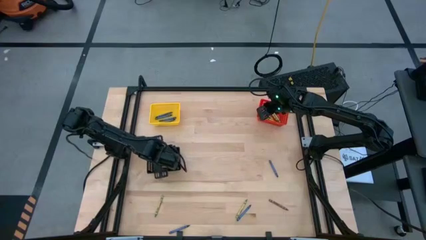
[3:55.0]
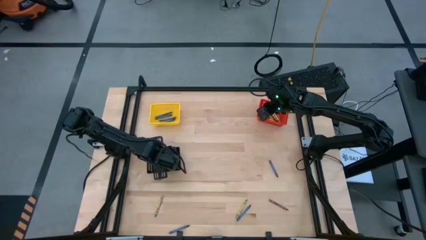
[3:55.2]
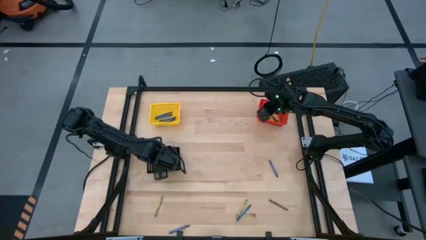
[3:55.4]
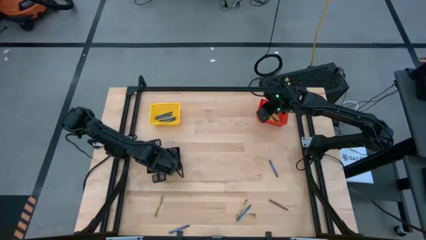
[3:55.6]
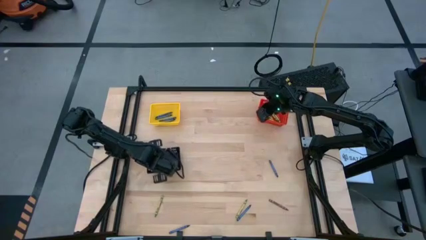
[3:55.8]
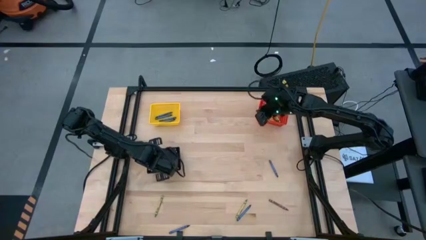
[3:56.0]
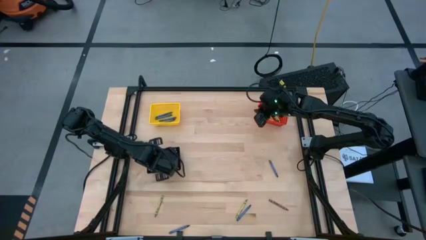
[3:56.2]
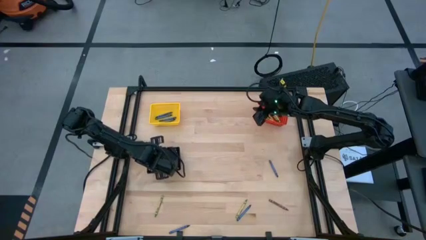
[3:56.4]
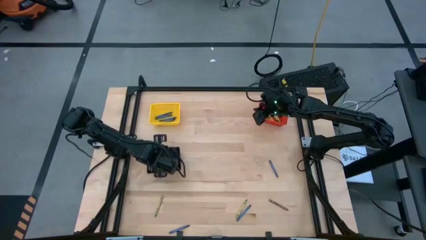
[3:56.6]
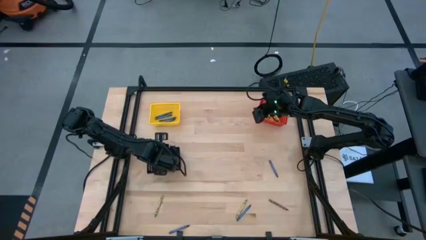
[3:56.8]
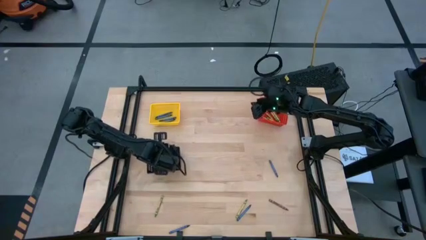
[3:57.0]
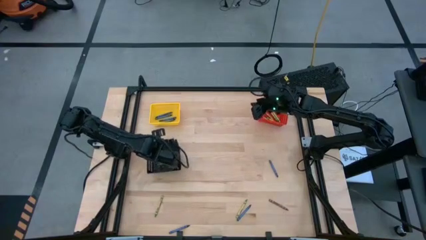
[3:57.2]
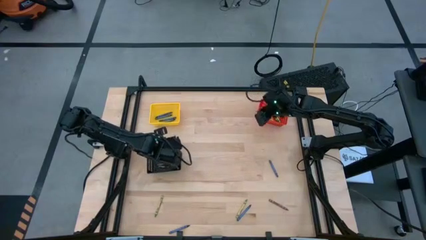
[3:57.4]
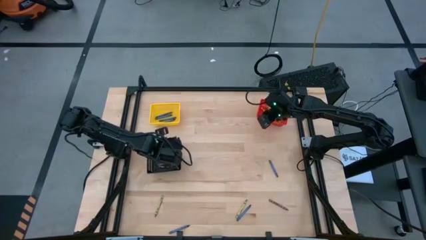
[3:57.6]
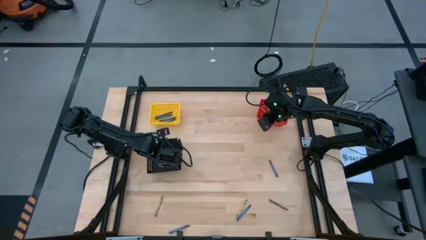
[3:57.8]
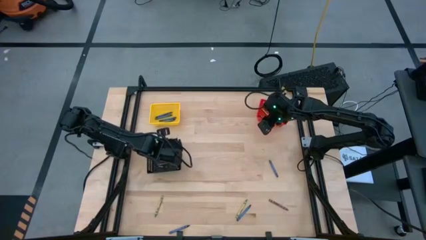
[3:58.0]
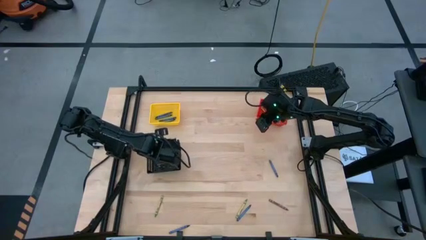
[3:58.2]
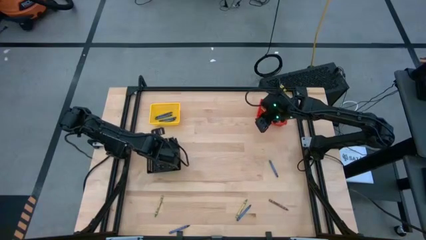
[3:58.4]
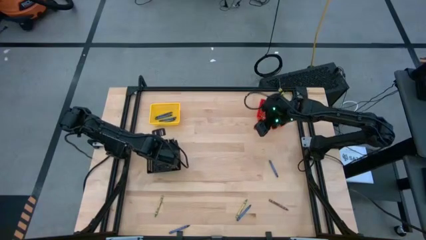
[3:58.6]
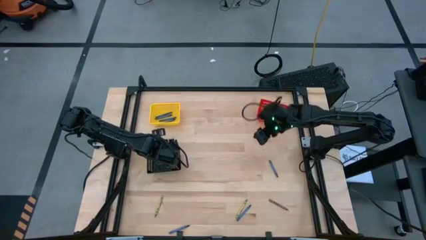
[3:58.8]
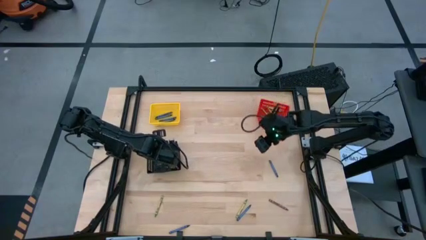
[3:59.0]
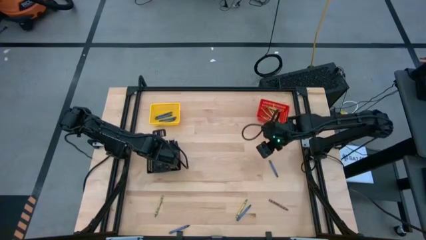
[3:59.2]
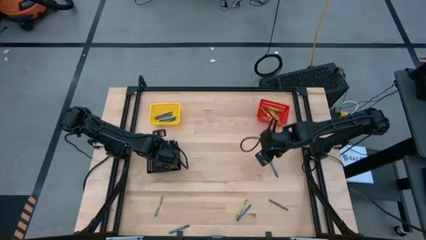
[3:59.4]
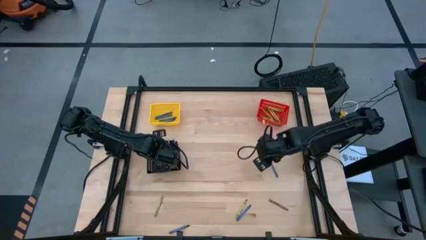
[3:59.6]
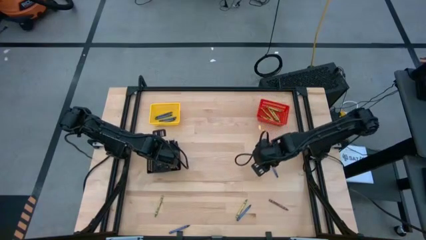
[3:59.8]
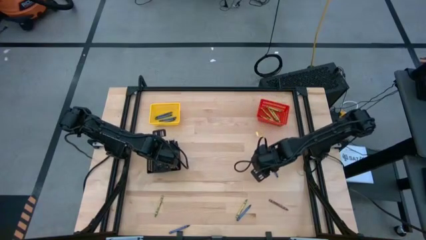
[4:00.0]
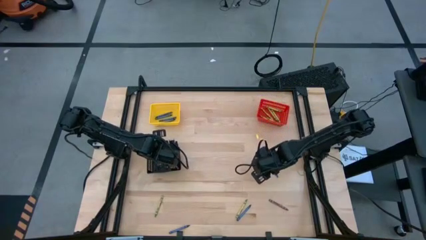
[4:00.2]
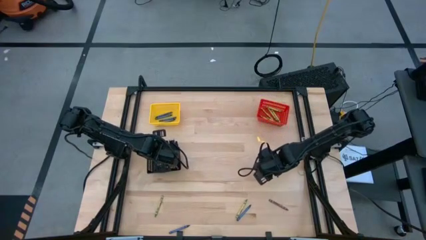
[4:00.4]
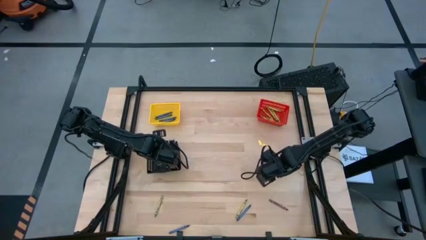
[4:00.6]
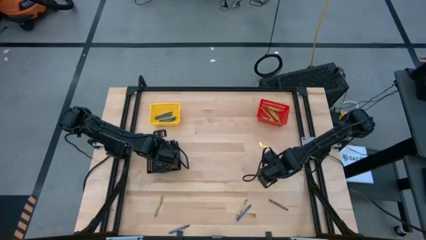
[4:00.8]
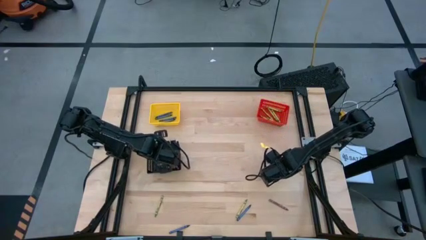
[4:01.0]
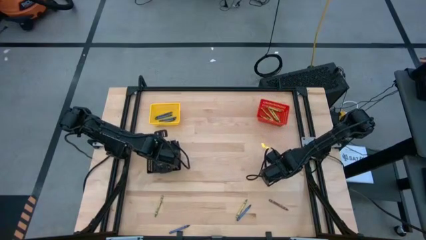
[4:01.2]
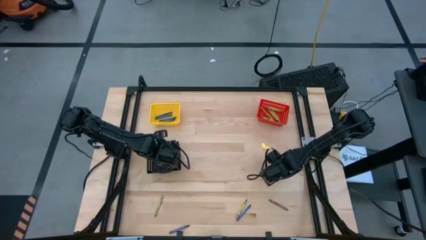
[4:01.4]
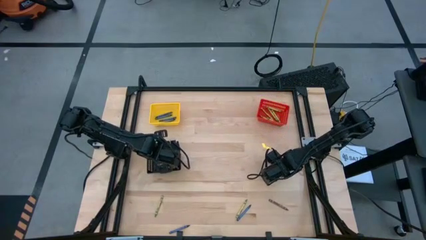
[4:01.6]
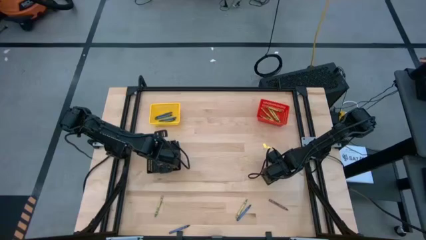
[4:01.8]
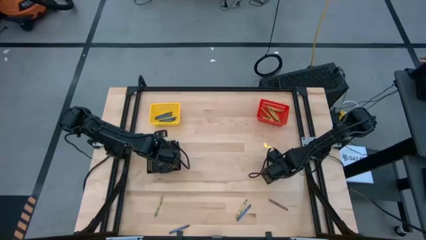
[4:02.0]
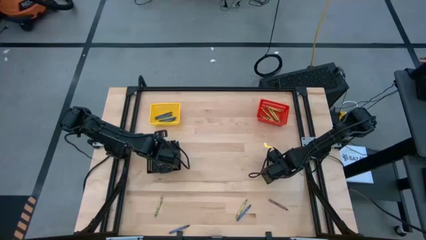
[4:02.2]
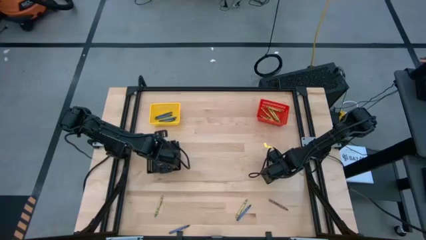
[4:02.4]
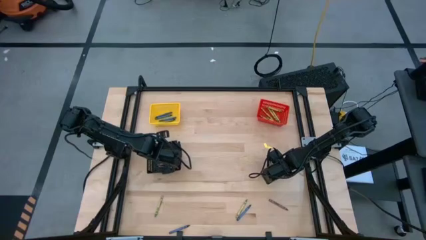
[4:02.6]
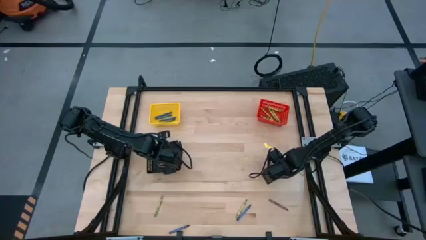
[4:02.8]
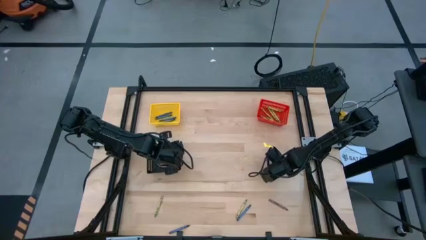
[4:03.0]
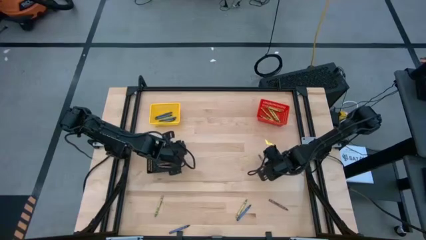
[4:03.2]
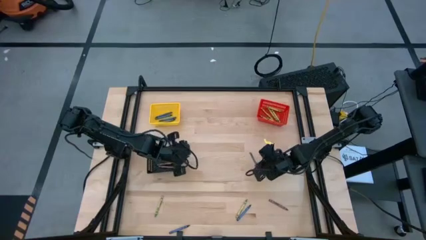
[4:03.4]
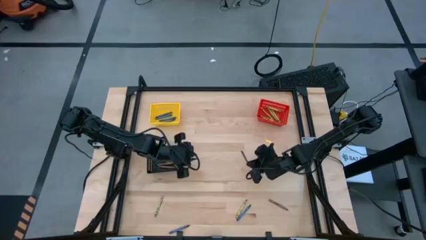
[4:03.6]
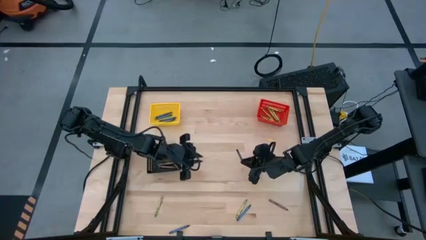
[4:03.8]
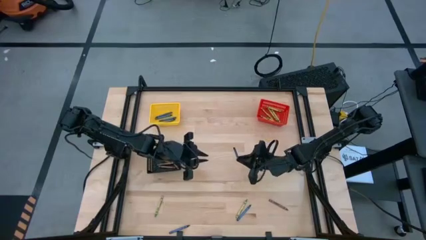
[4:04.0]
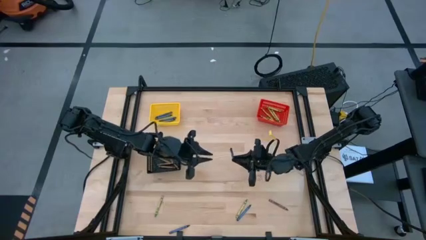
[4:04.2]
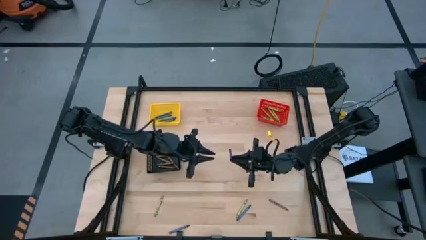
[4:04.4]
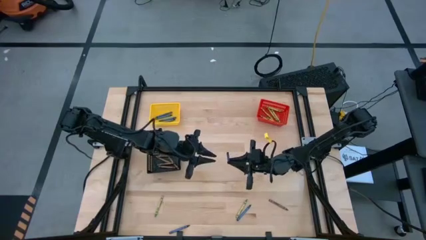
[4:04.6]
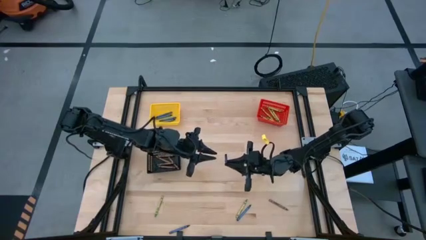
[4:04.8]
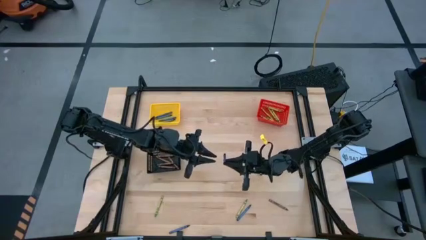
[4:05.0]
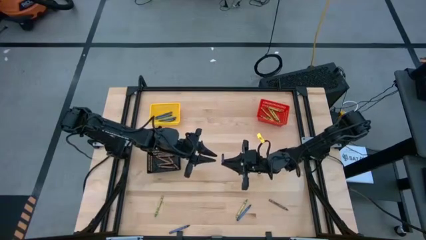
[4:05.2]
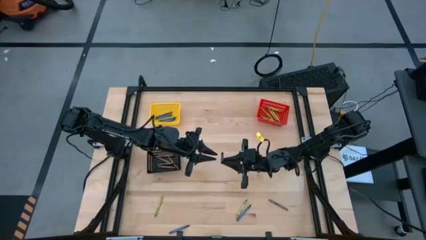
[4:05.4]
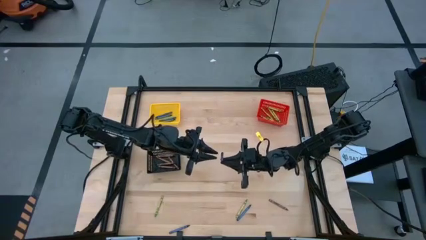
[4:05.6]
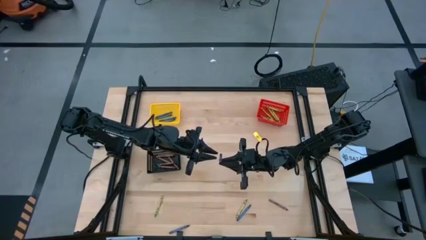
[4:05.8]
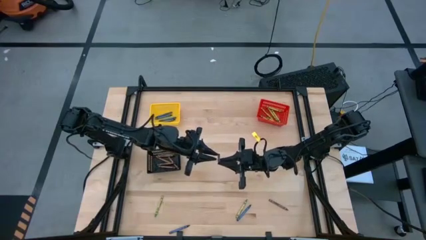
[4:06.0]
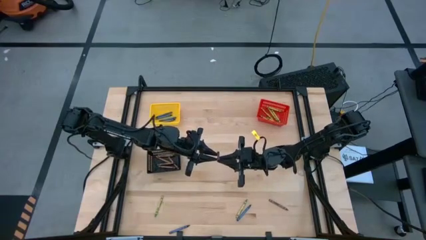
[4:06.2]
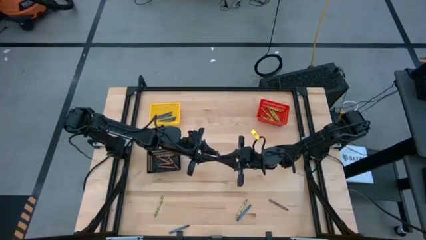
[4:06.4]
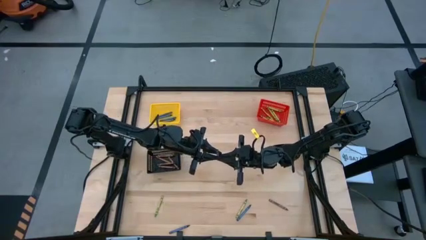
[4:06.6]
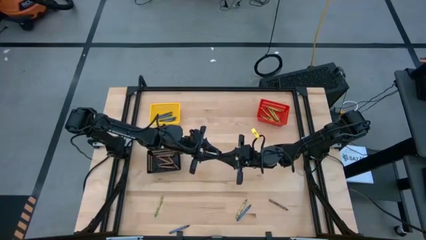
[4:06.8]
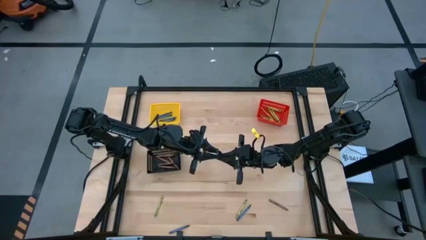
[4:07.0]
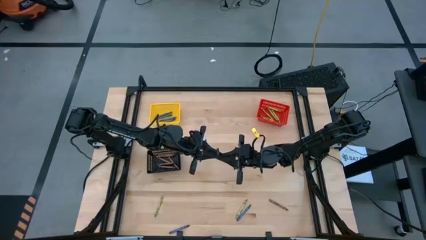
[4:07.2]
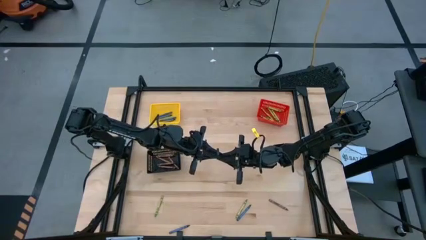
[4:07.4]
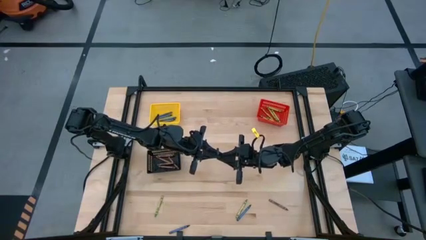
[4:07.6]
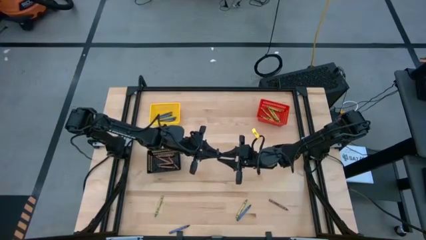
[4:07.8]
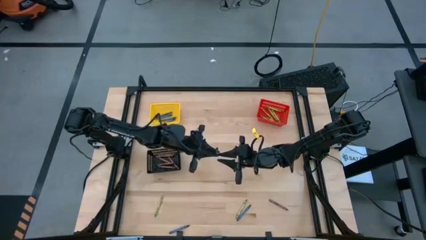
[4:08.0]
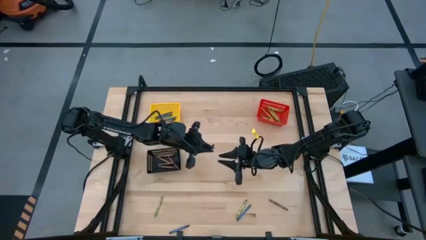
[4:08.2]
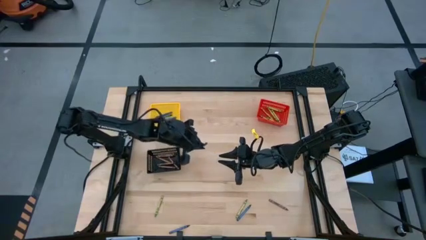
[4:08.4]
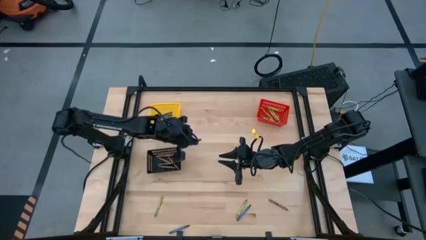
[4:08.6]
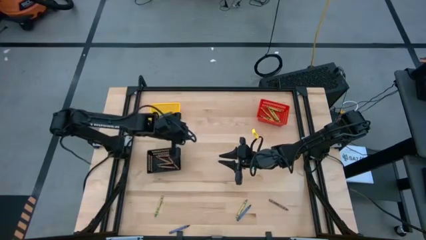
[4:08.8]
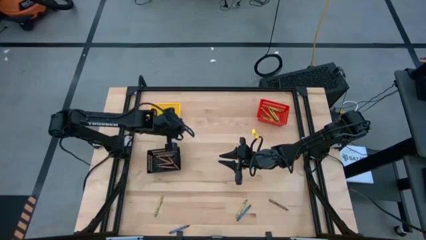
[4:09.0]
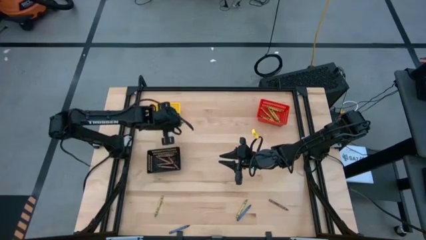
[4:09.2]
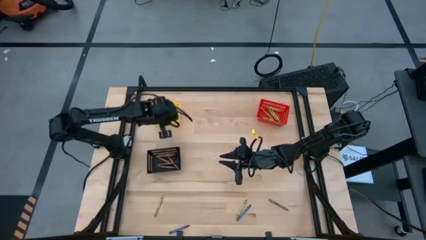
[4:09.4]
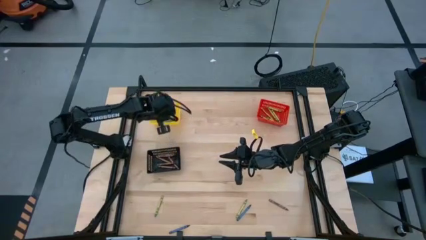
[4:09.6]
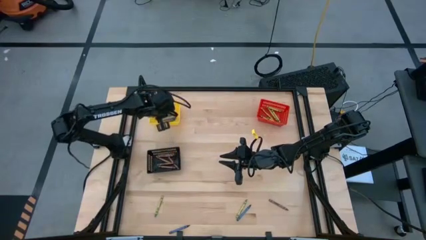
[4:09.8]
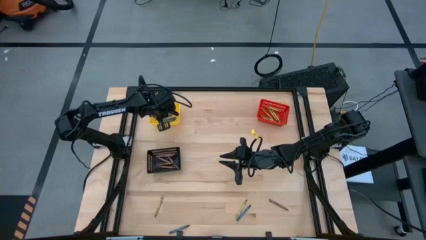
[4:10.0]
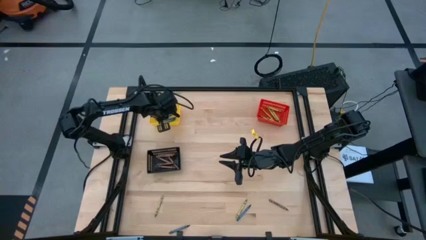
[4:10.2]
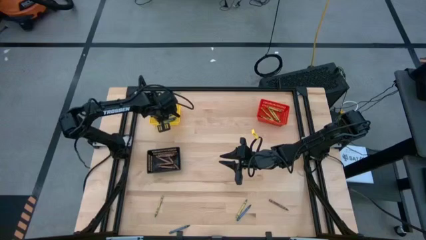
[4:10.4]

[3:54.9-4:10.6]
Task: Sort crayons
Put the blue crayon into the yellow bin
